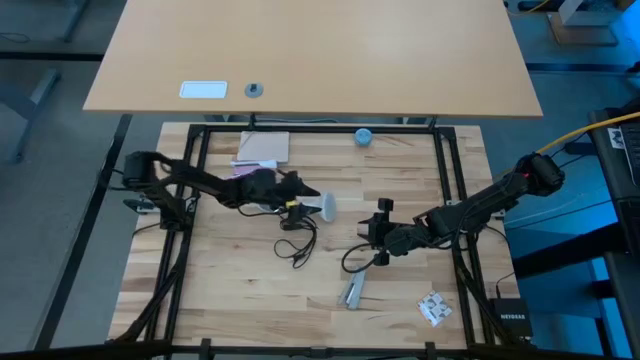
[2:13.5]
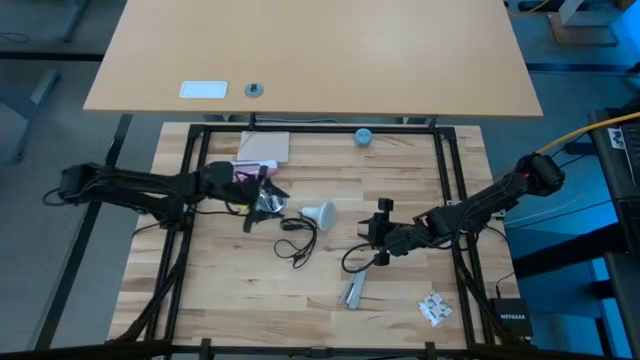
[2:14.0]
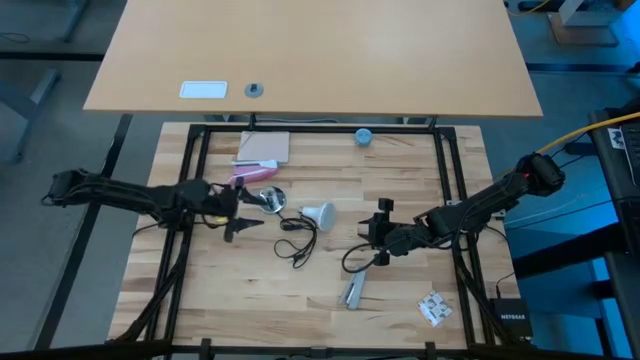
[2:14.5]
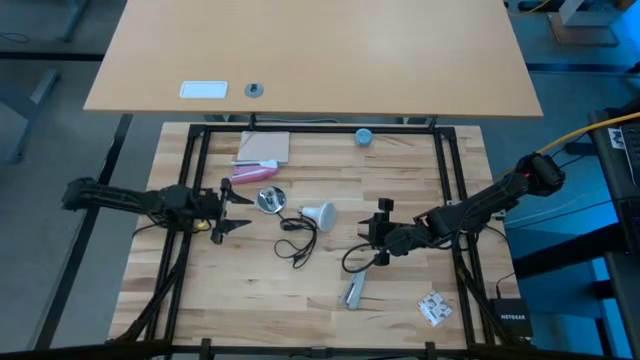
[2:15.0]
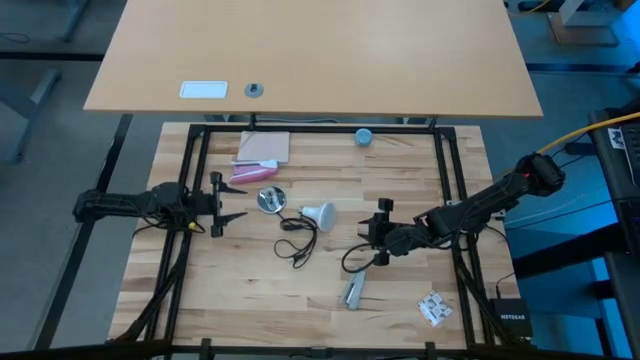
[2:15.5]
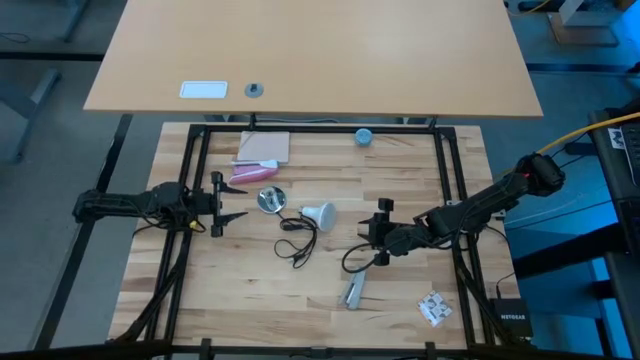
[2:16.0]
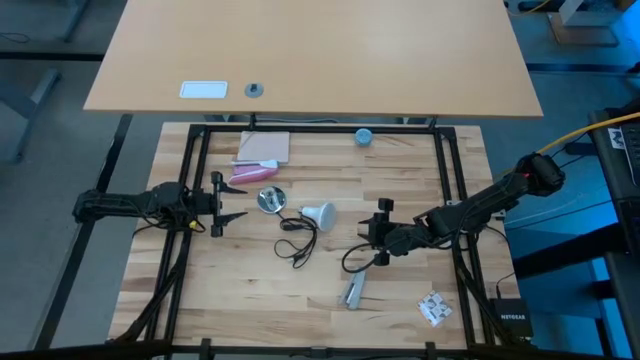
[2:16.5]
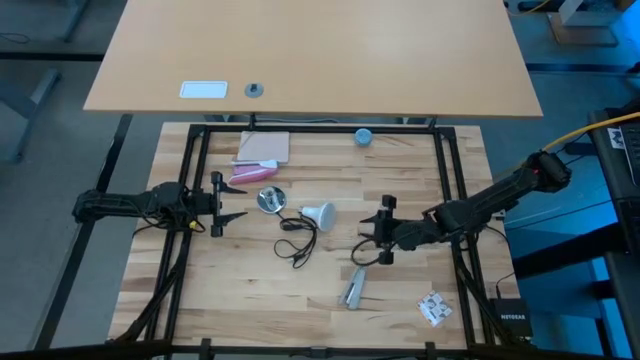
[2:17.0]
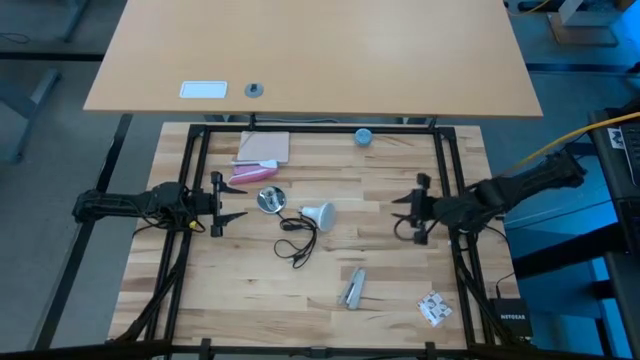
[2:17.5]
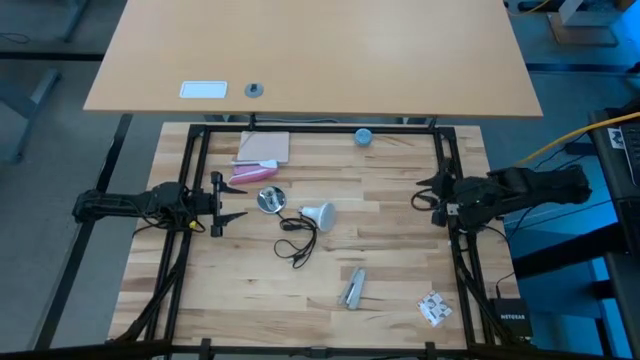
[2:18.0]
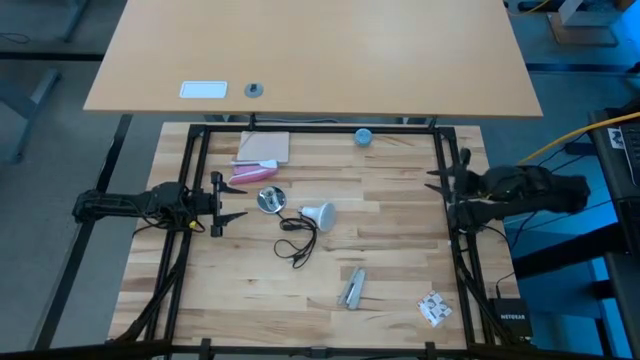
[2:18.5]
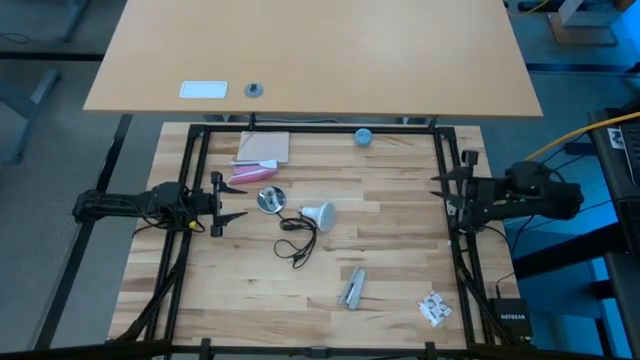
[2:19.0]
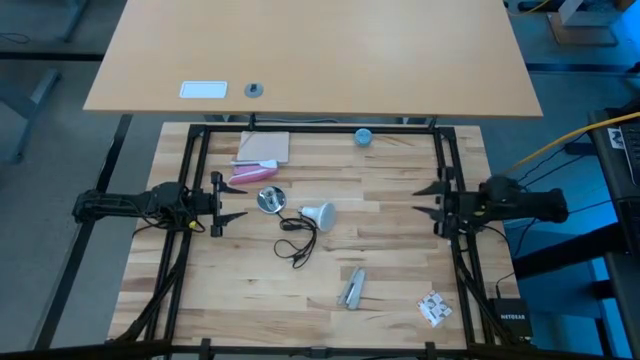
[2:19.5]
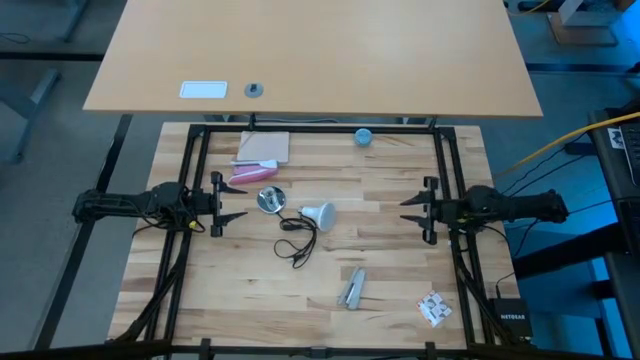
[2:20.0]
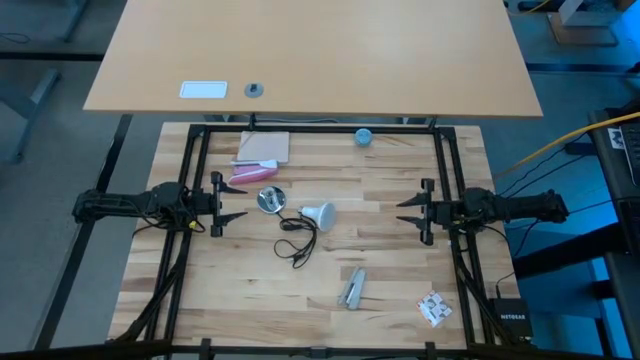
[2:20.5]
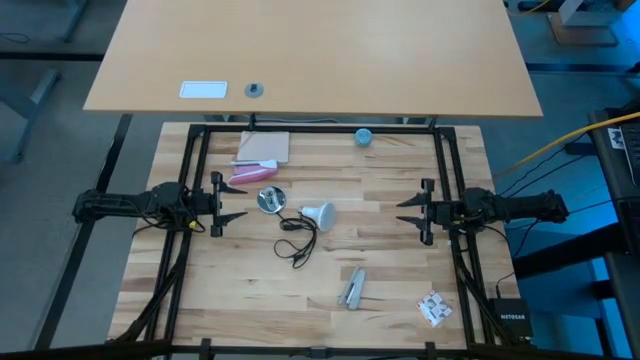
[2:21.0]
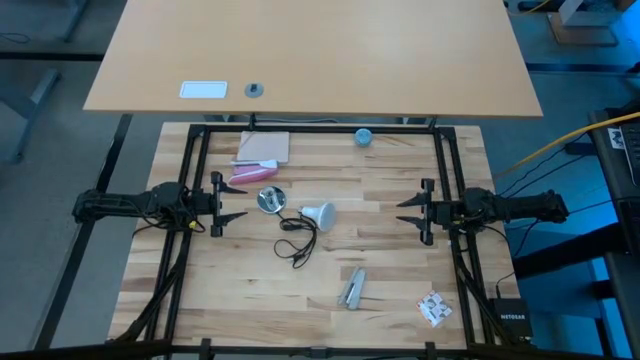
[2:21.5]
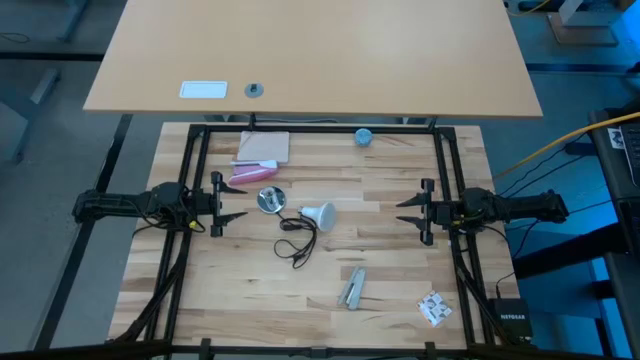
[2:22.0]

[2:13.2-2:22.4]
Task: Screw lightbulb
Return to Home Position

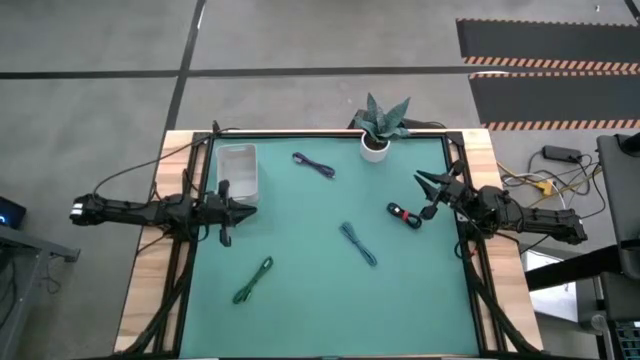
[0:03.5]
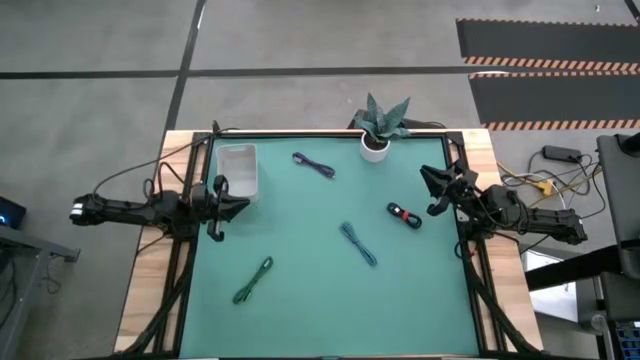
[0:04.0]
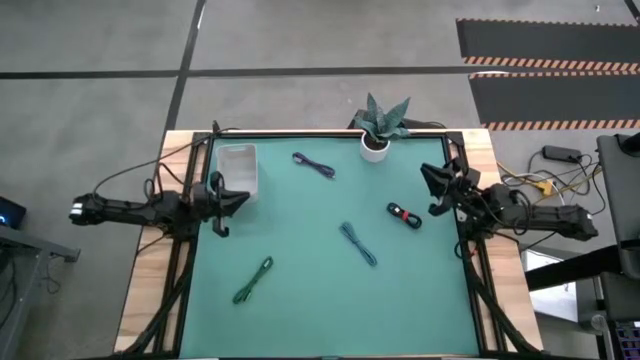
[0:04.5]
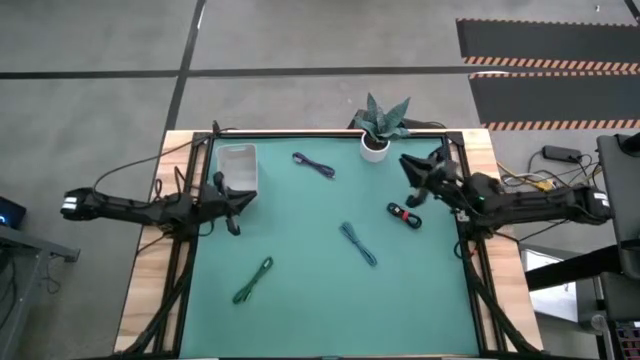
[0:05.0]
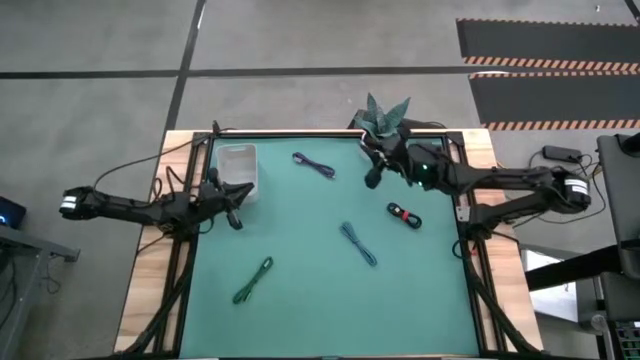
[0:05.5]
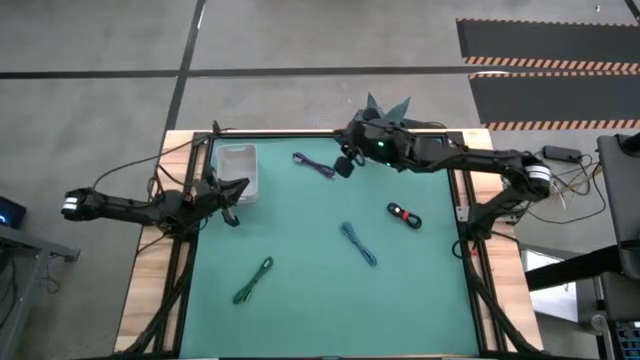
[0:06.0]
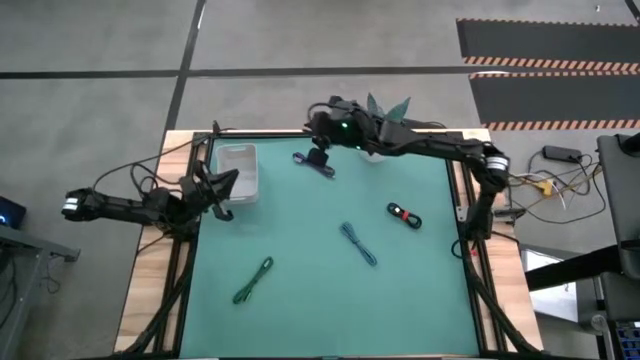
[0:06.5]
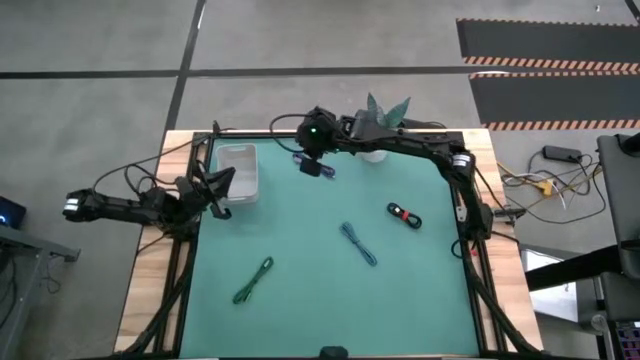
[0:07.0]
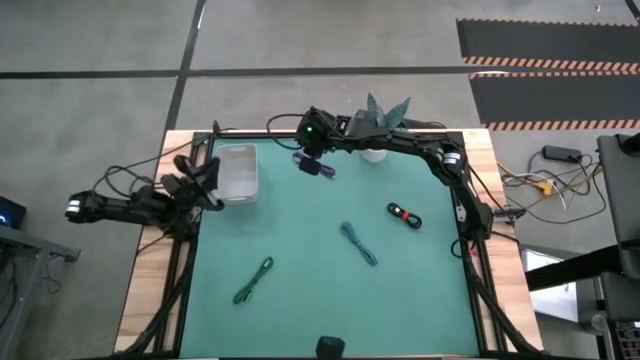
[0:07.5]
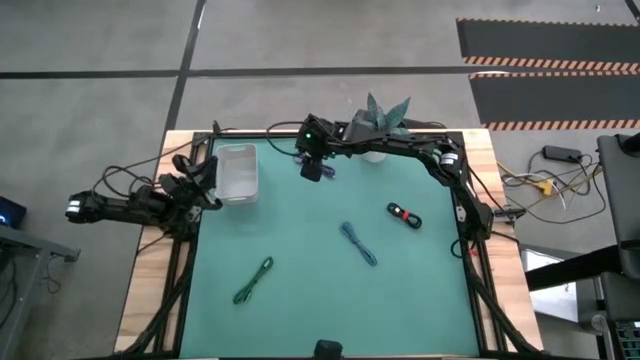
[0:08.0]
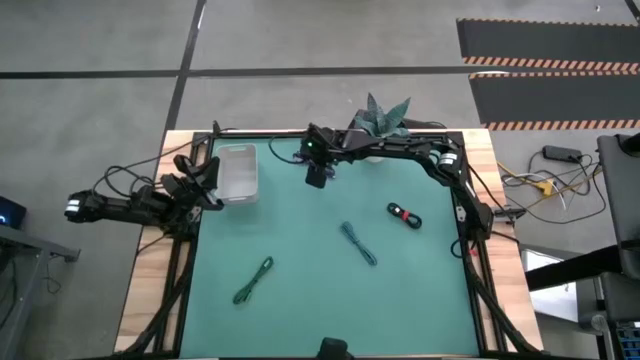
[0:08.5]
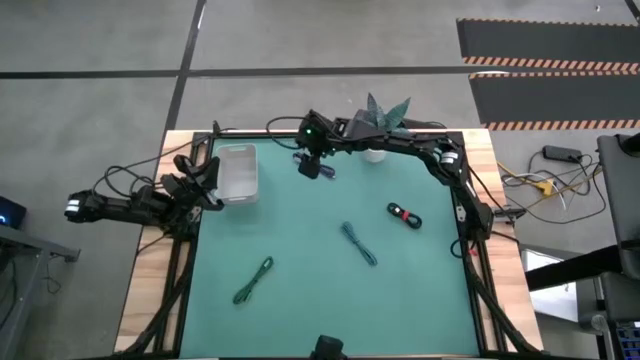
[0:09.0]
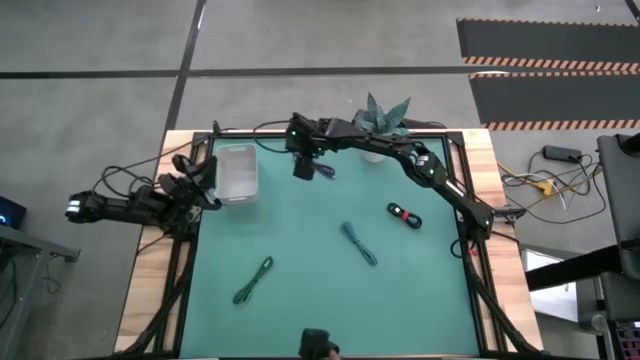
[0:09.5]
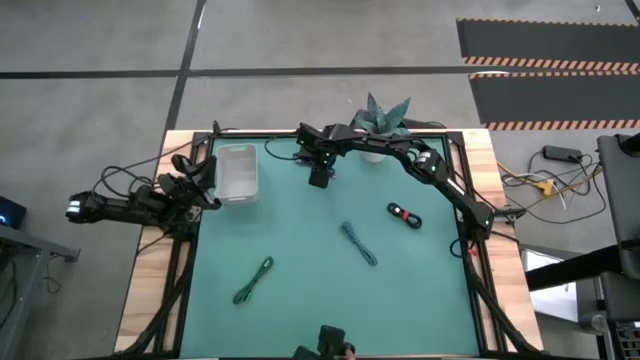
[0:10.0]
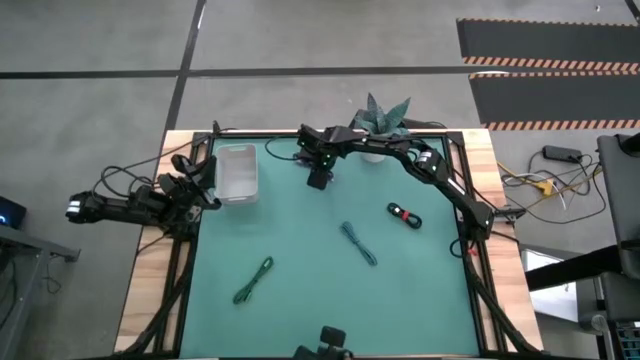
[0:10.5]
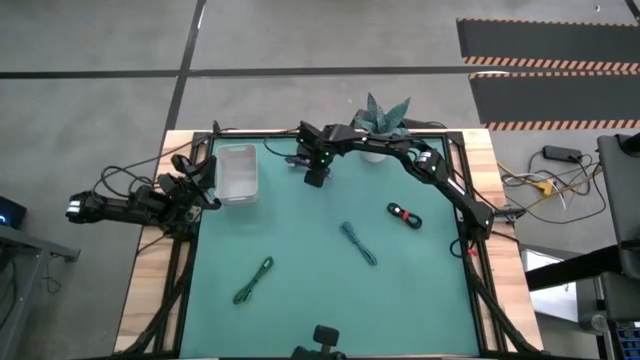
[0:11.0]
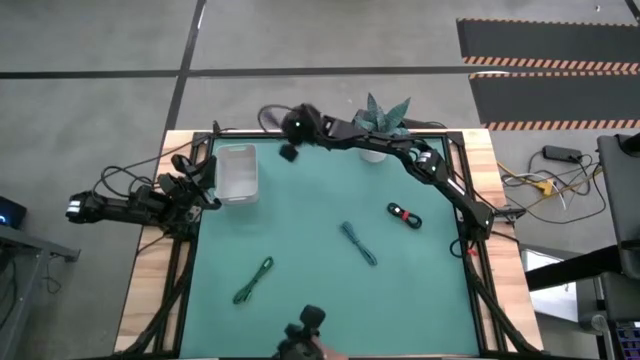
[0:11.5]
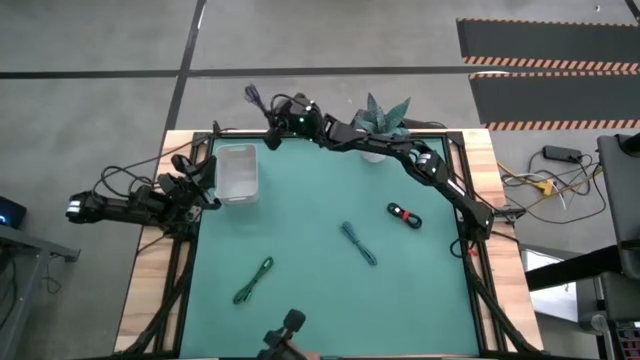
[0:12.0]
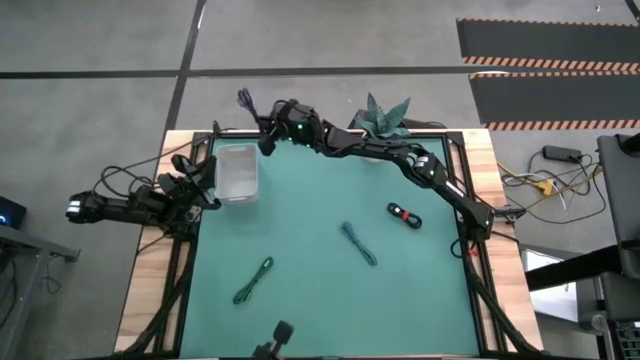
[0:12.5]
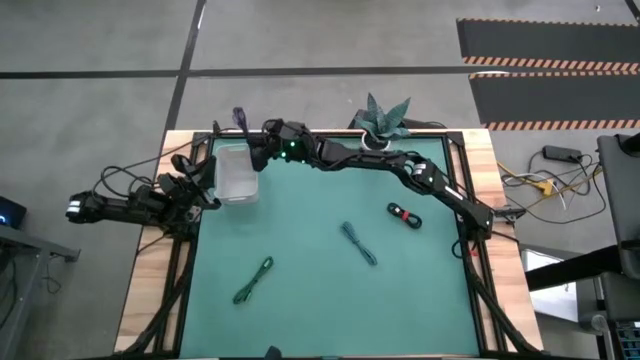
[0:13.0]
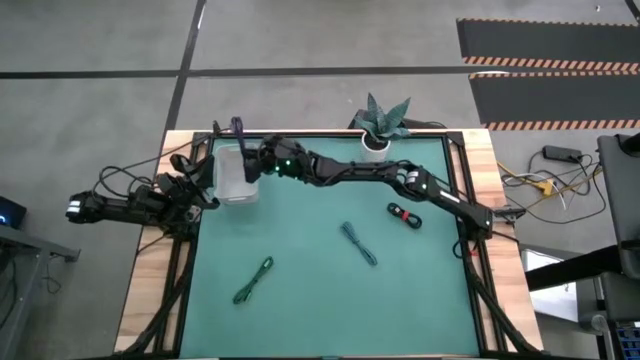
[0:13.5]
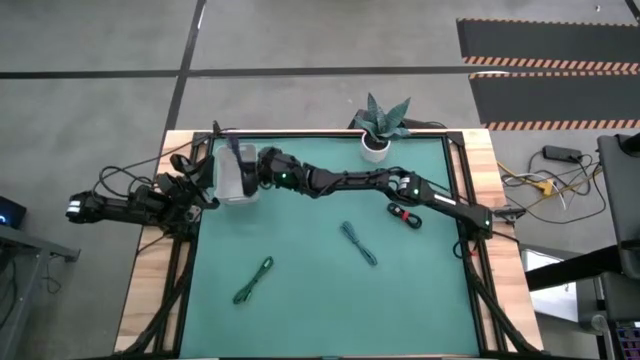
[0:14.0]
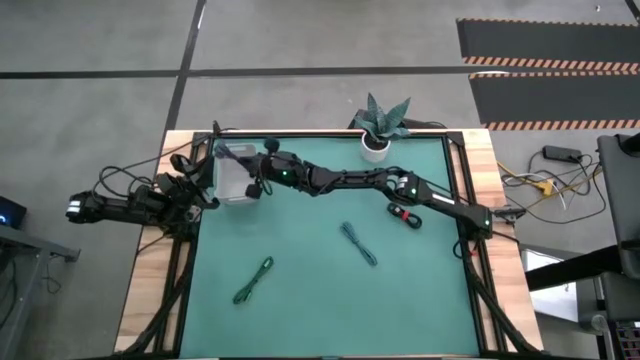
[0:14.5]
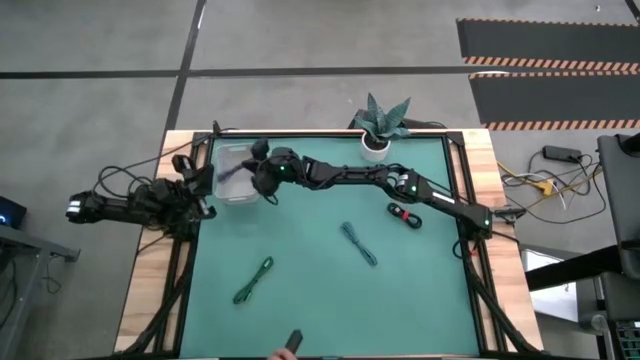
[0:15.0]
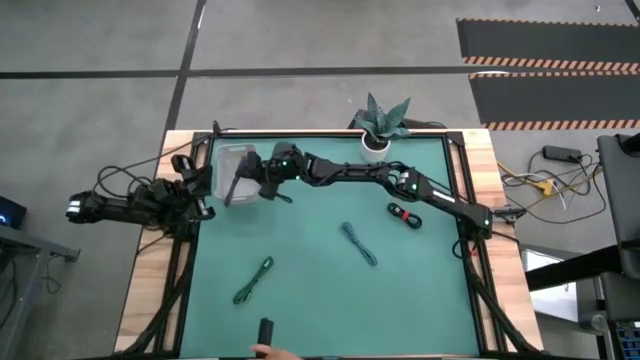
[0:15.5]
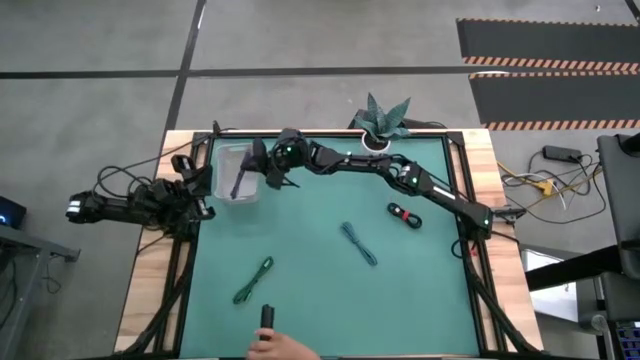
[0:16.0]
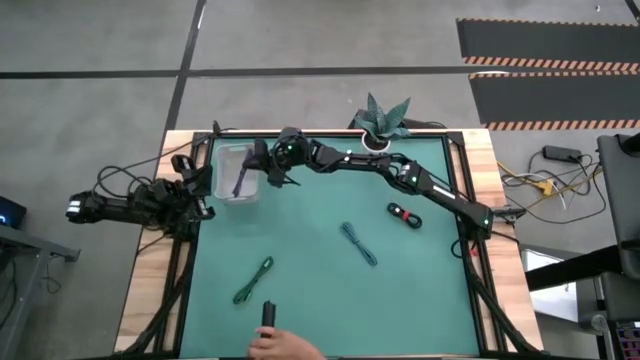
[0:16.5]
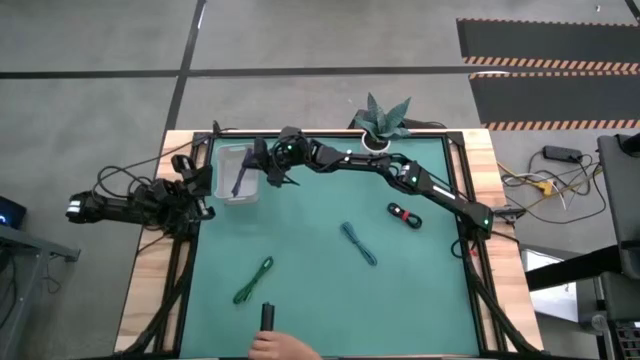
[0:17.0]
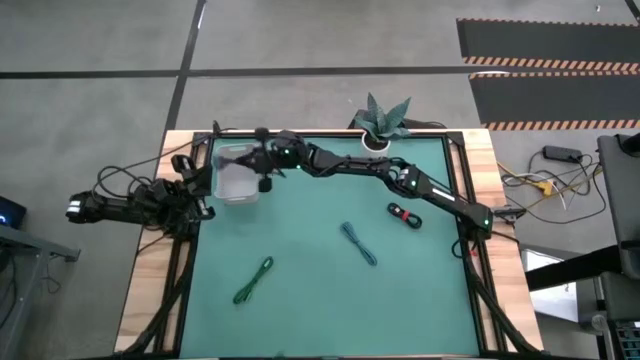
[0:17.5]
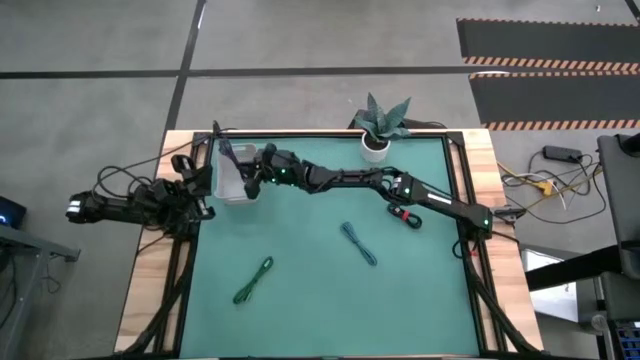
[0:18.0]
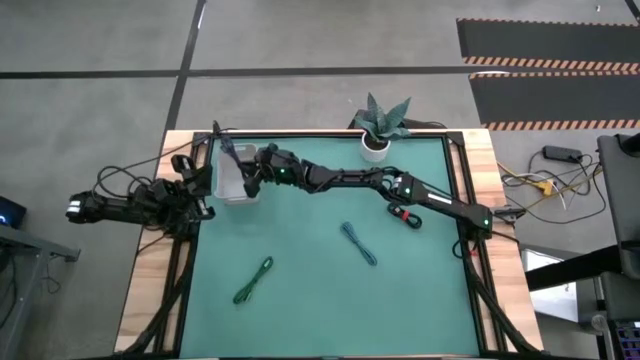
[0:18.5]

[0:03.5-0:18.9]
Task: Pick and place USB-C Cables
Put the purple usb cable into the gray bin
